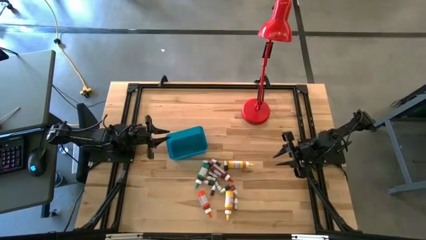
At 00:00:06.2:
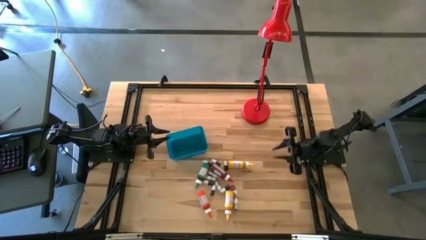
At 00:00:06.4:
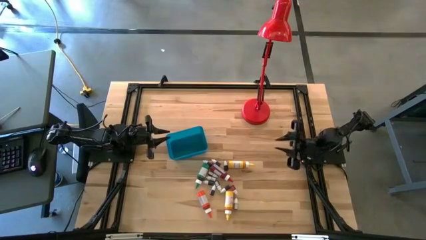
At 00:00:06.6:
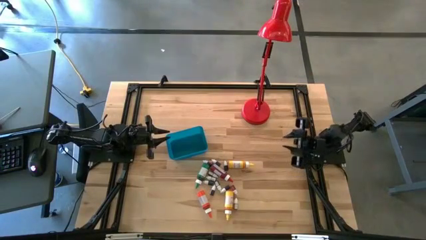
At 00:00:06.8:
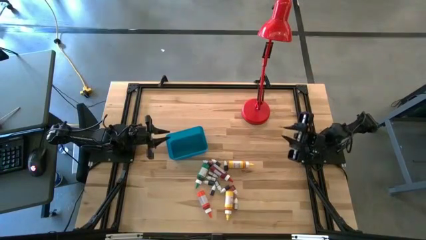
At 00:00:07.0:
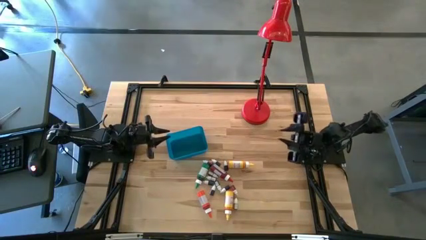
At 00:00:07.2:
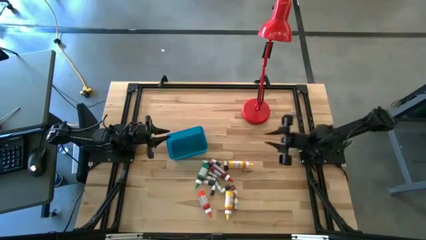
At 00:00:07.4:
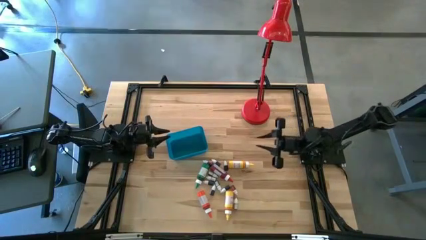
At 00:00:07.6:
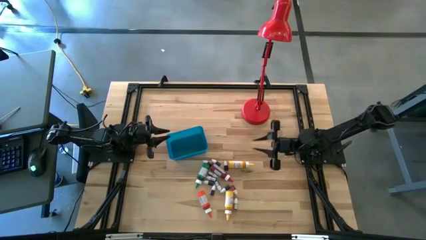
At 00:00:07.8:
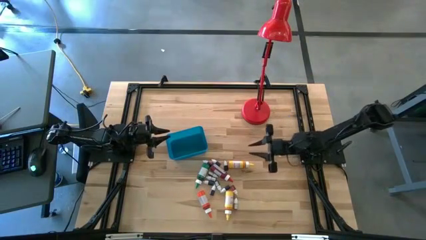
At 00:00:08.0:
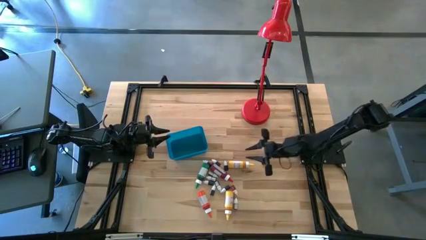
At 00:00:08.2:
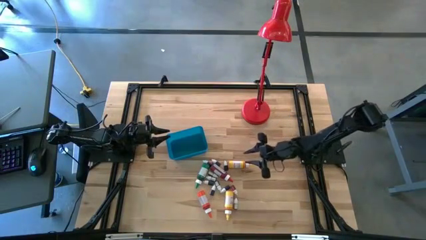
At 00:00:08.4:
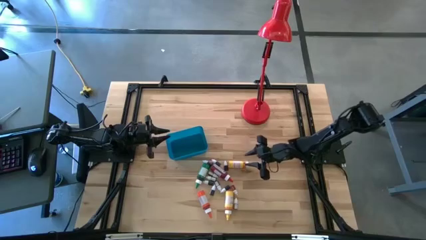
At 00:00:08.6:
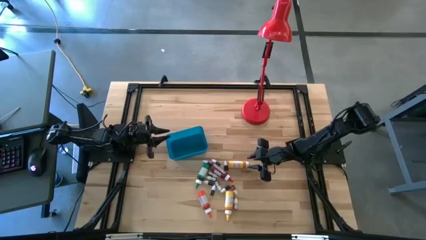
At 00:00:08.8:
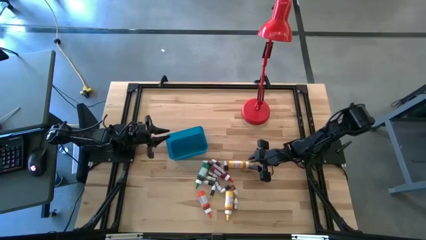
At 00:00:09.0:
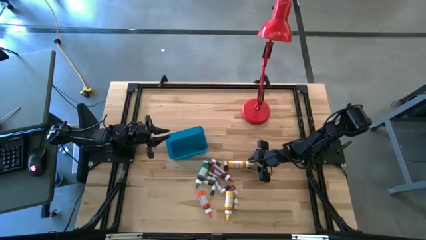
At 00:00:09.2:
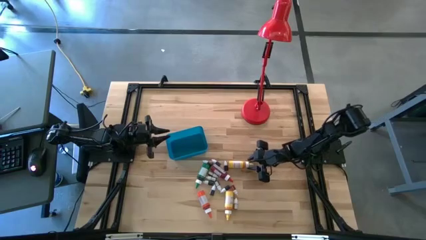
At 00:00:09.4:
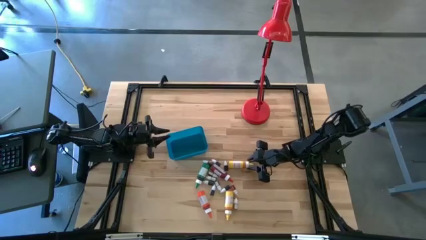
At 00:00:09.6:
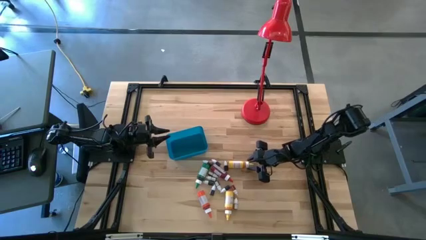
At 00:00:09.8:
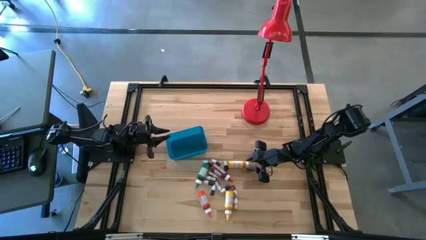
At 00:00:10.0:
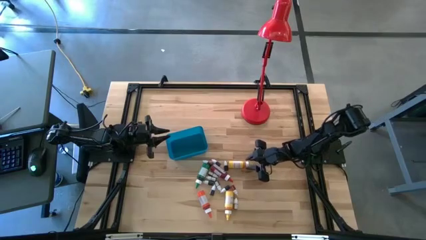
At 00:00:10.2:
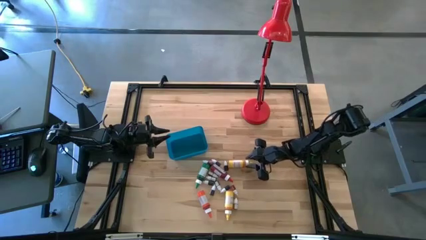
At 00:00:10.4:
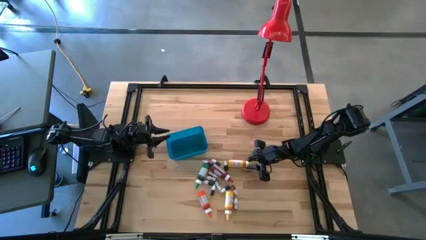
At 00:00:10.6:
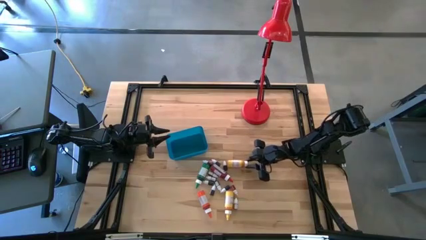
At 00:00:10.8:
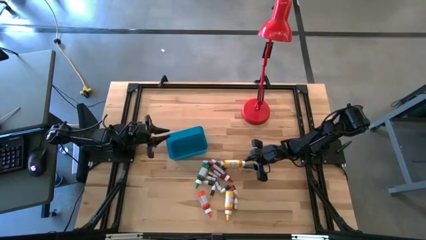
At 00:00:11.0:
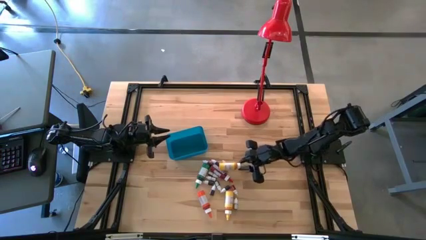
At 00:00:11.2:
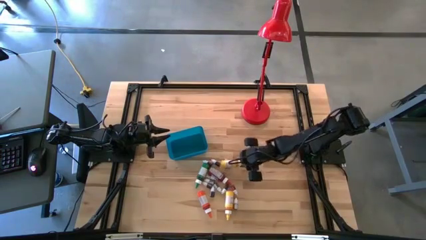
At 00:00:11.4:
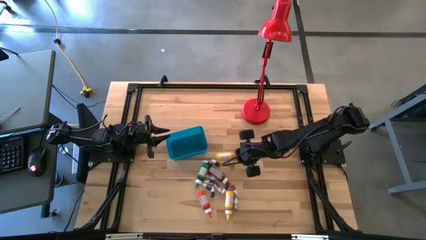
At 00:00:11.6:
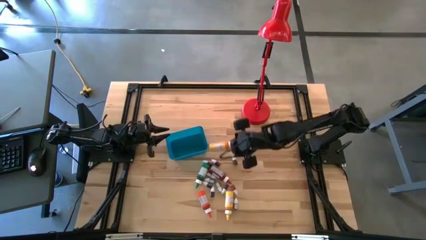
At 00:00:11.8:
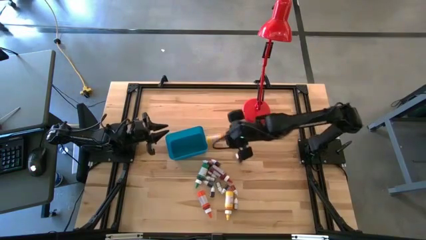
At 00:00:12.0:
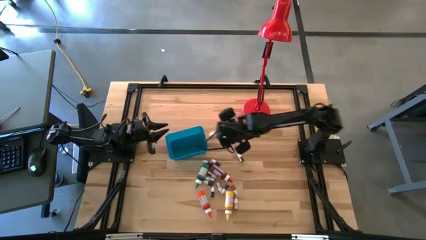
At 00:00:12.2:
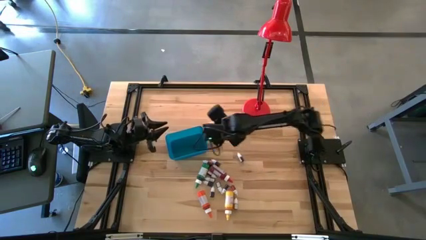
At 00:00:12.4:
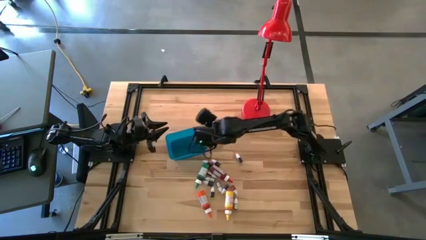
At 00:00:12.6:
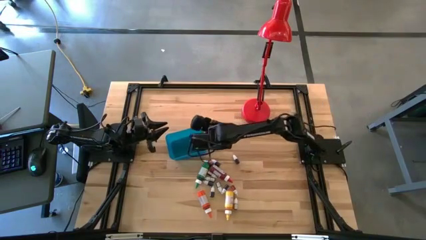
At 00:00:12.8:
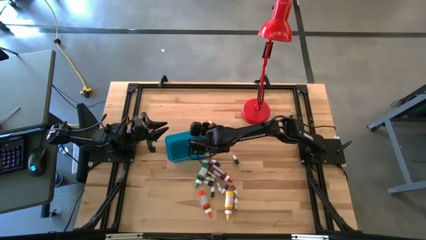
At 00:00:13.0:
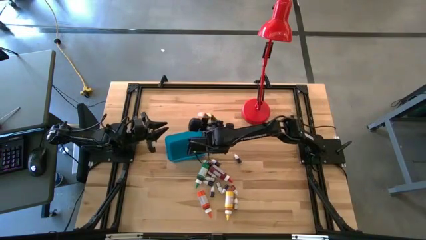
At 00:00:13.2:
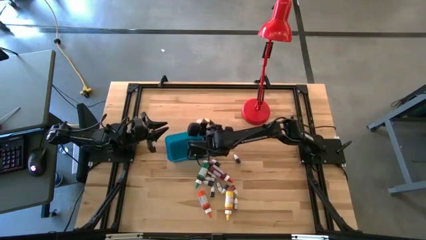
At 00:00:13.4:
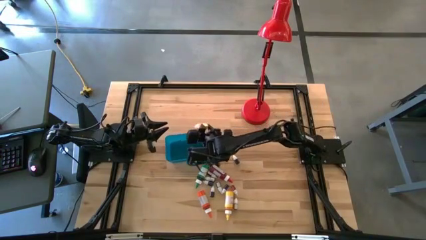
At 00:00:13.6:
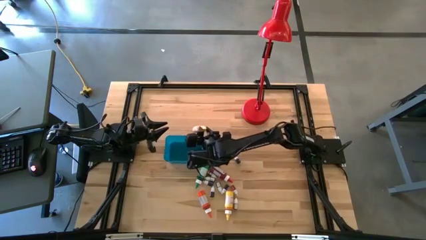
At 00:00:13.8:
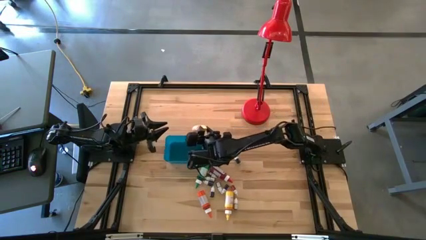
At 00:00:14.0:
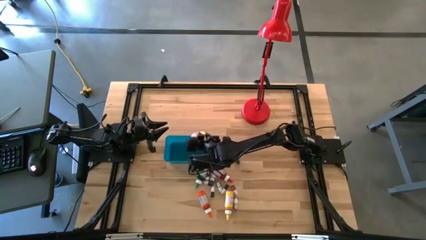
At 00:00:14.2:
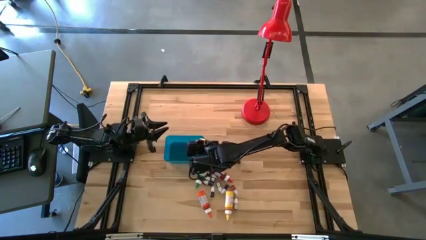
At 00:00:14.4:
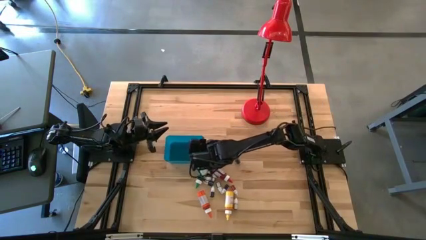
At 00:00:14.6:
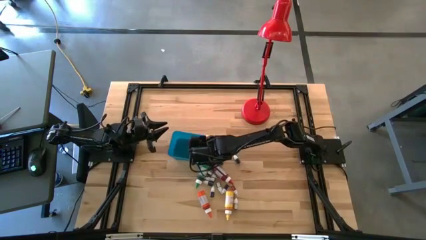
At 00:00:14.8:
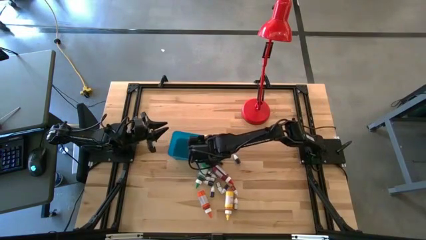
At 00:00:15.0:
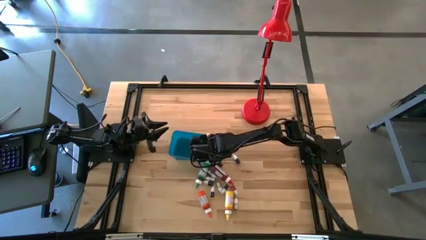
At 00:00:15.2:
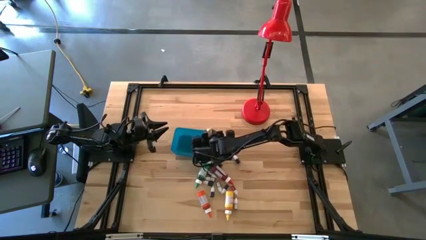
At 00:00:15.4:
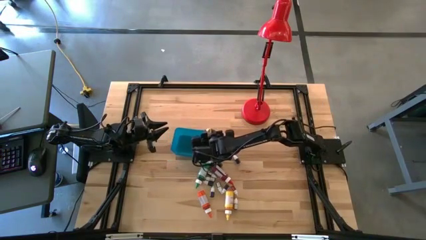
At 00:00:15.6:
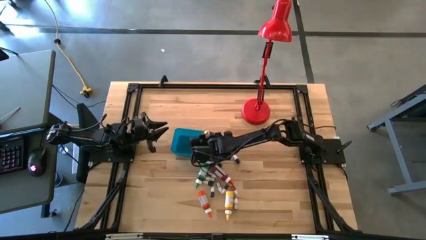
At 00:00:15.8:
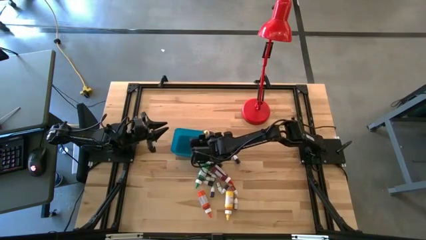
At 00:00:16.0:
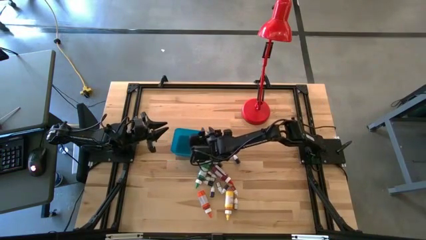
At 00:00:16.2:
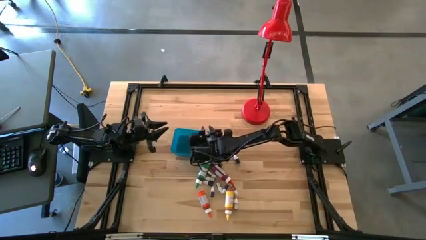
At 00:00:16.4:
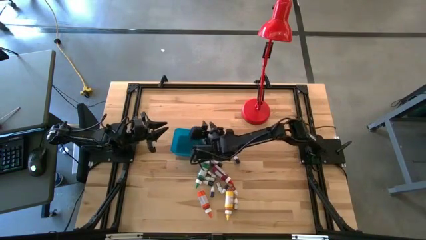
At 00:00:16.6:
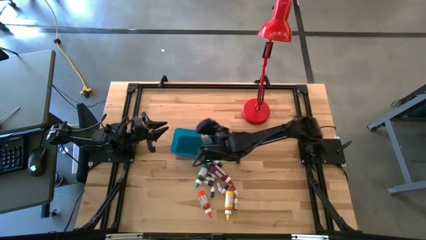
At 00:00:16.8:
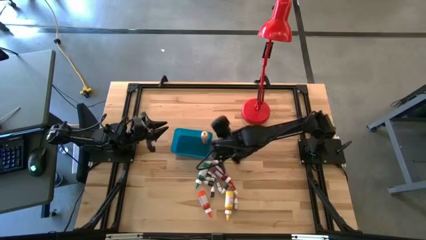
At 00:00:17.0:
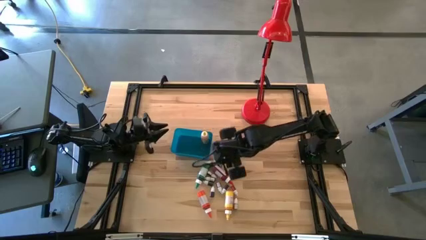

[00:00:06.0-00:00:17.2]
Task: Pick & Place food coloring
Put the large yellow food coloring into the blue bin

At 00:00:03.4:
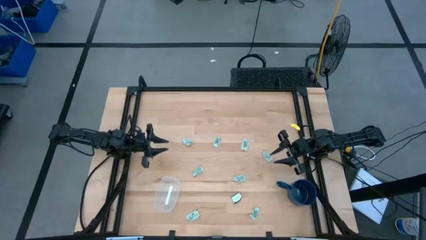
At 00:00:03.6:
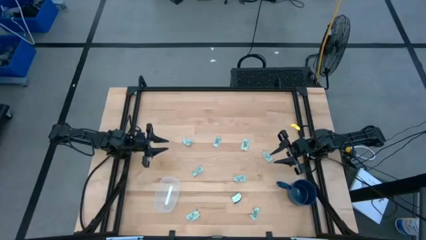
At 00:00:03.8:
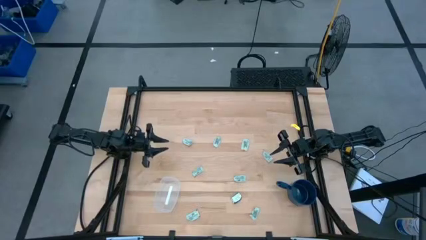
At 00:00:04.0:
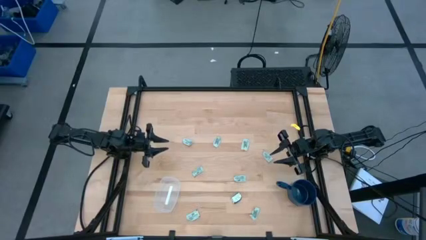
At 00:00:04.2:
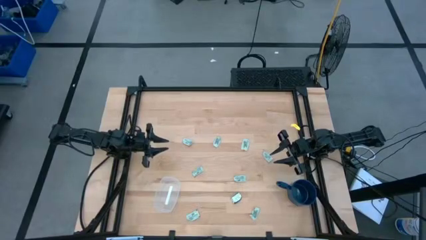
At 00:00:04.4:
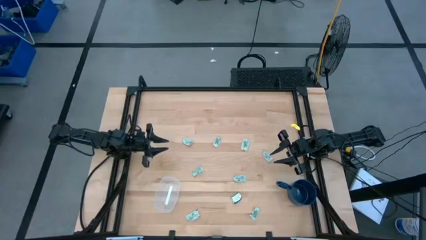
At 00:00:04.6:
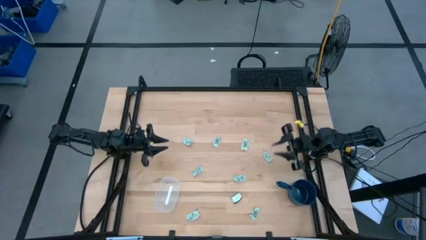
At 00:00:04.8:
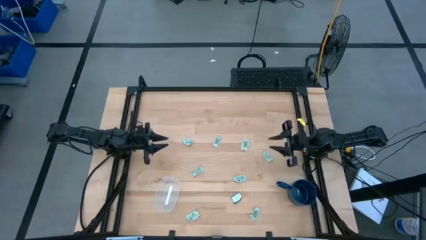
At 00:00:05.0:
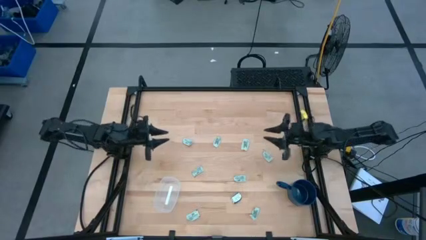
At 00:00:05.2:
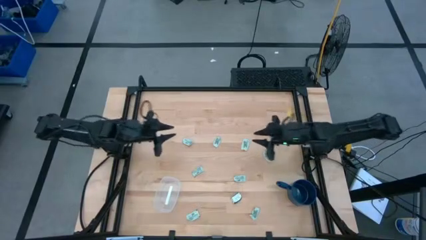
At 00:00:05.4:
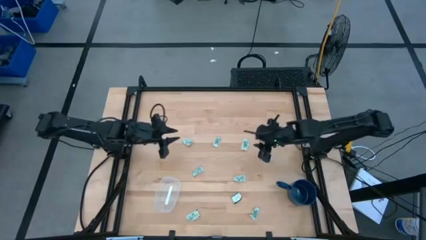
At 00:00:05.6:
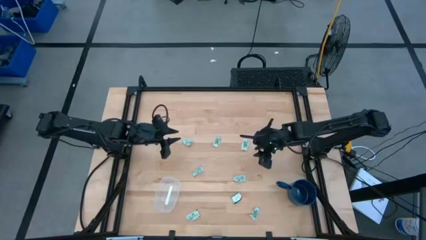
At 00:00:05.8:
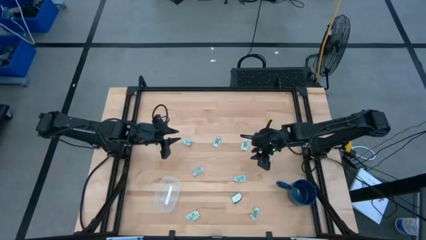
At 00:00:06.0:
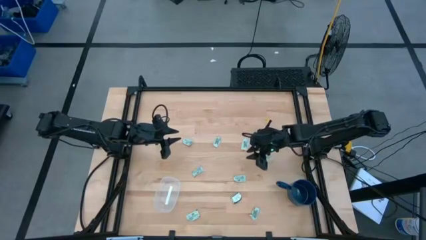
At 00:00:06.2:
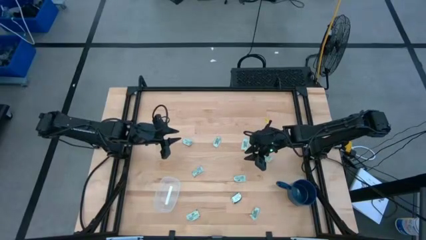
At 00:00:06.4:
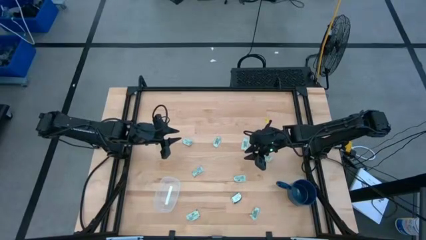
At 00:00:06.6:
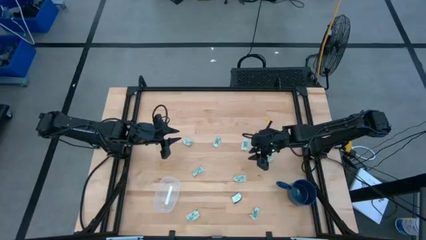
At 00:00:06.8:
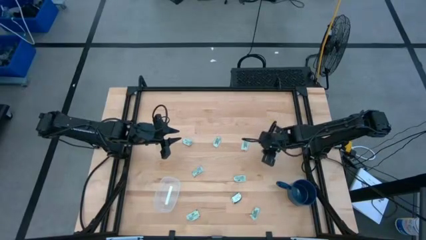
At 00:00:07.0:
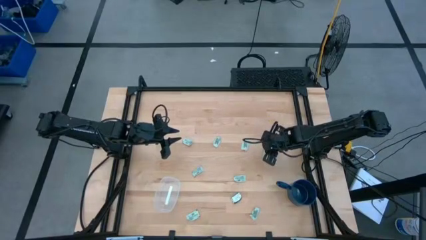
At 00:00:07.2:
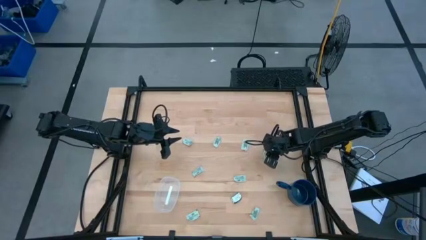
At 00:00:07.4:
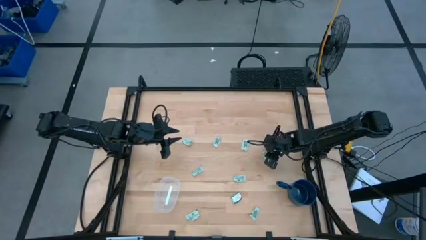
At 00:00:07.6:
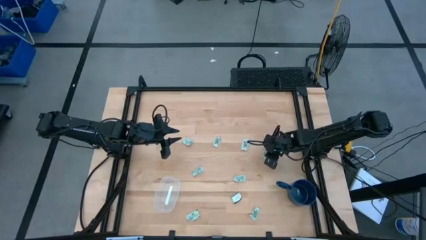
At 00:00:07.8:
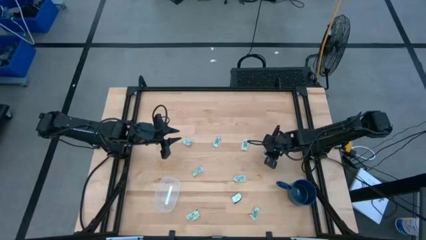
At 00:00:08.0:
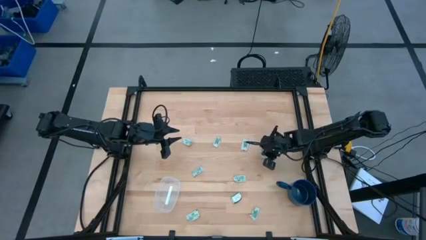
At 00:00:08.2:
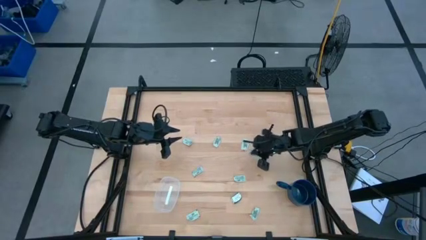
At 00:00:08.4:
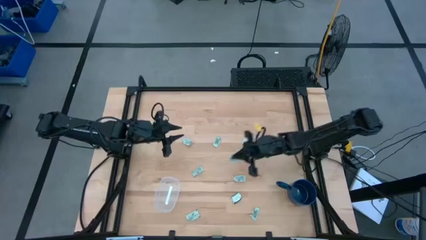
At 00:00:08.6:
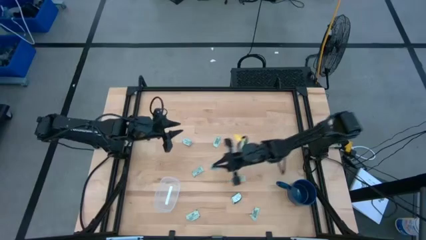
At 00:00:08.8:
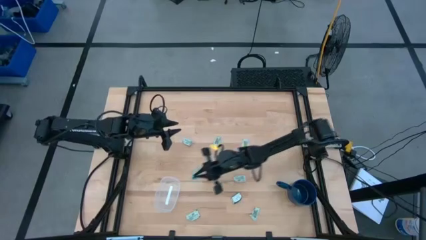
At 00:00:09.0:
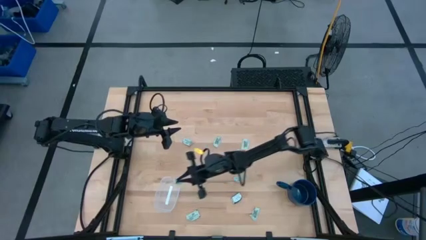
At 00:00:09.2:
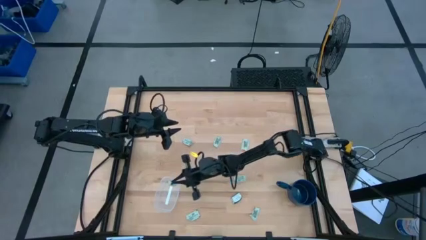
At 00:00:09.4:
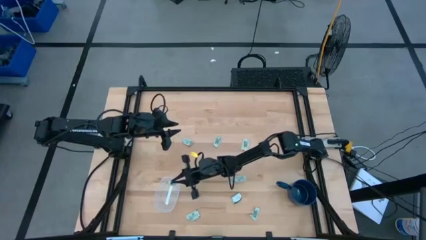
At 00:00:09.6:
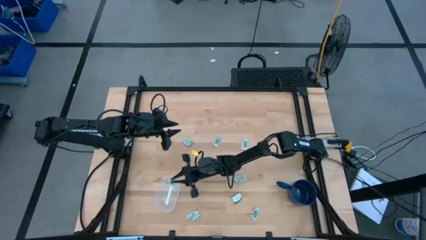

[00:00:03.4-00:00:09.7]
Task: Pick and place Stevia / Truvia into bins
Put the stevia packet into the transparent container
